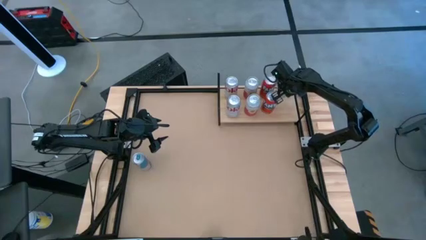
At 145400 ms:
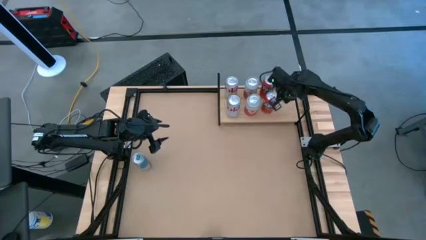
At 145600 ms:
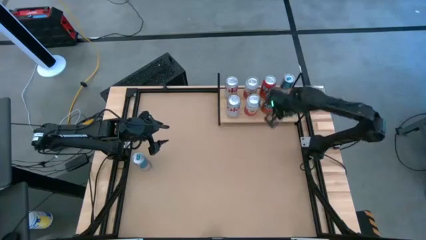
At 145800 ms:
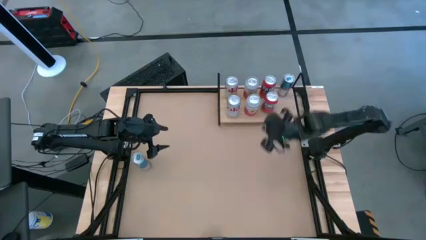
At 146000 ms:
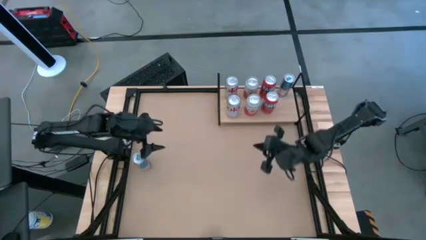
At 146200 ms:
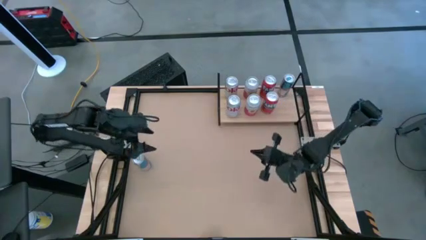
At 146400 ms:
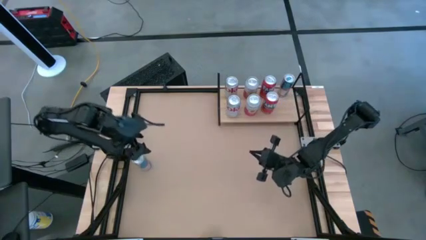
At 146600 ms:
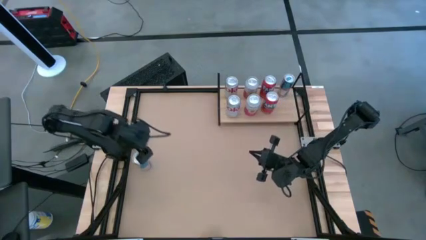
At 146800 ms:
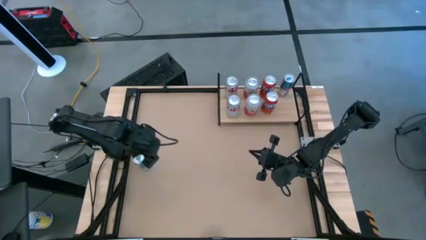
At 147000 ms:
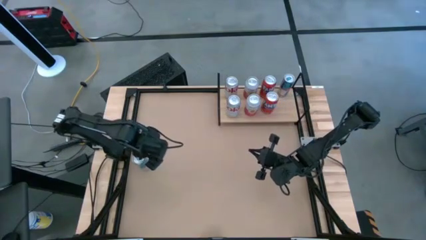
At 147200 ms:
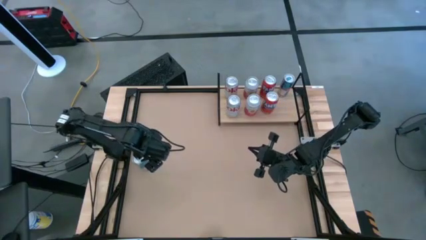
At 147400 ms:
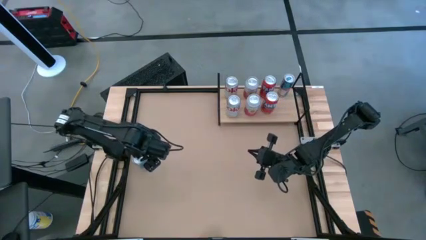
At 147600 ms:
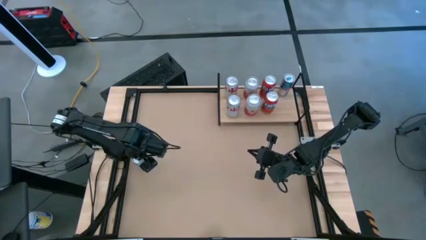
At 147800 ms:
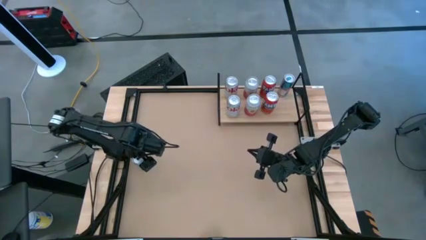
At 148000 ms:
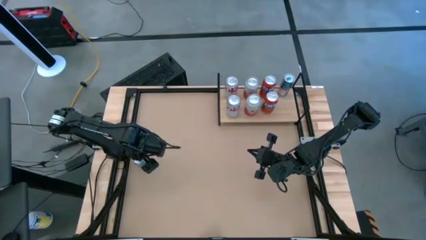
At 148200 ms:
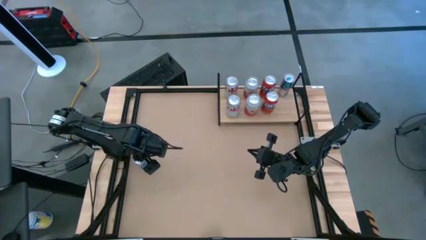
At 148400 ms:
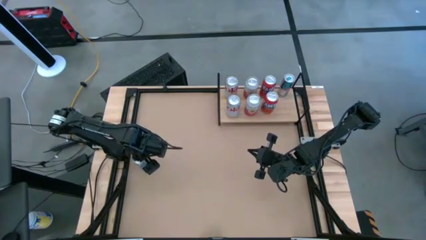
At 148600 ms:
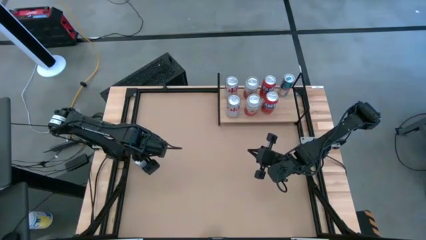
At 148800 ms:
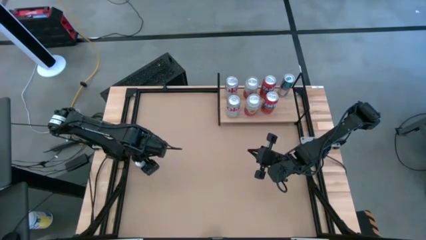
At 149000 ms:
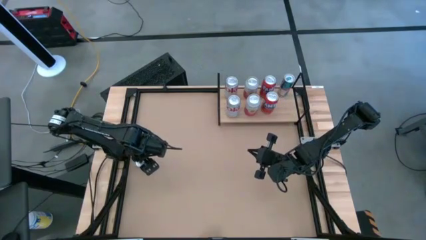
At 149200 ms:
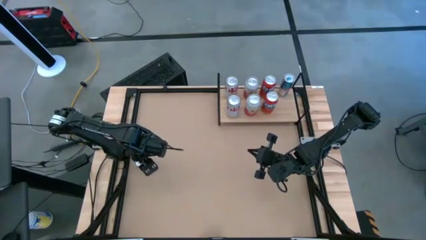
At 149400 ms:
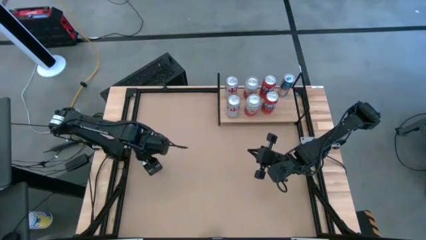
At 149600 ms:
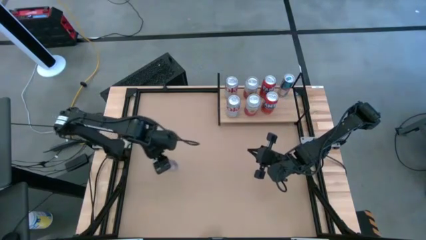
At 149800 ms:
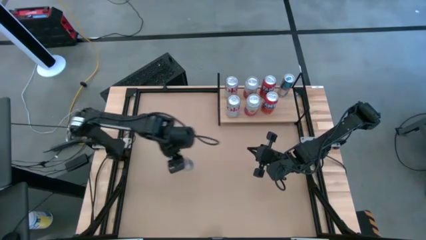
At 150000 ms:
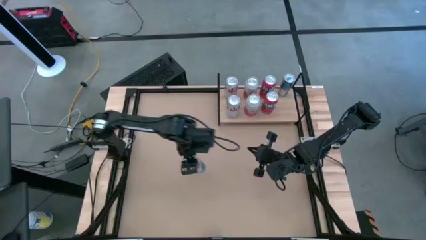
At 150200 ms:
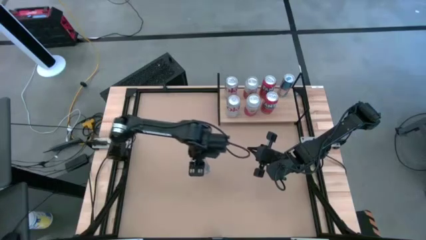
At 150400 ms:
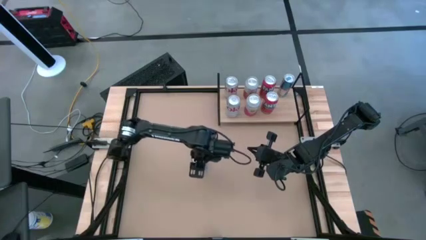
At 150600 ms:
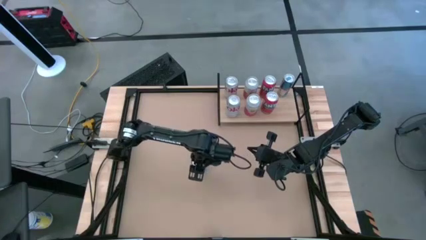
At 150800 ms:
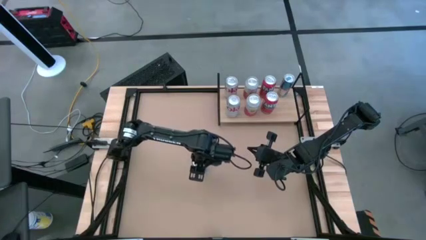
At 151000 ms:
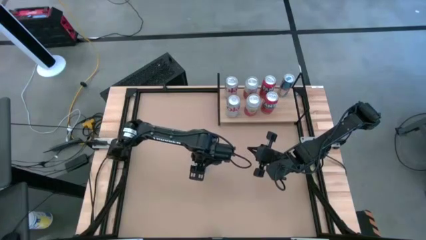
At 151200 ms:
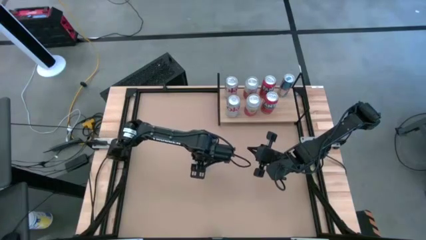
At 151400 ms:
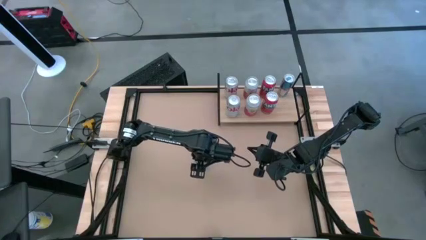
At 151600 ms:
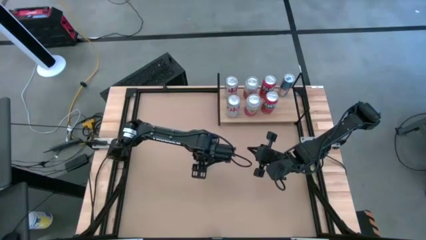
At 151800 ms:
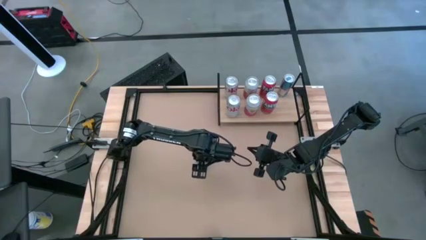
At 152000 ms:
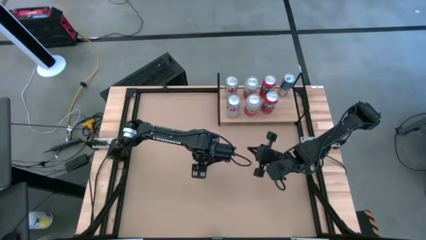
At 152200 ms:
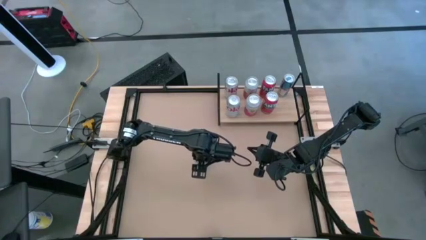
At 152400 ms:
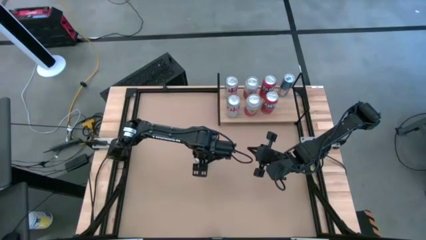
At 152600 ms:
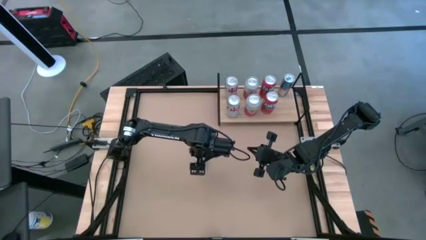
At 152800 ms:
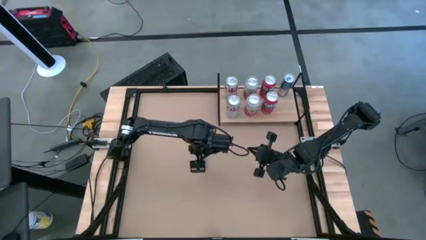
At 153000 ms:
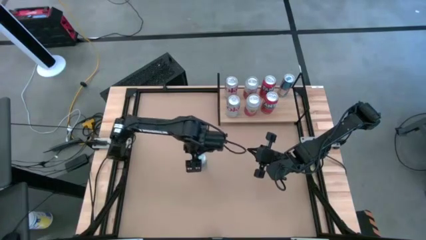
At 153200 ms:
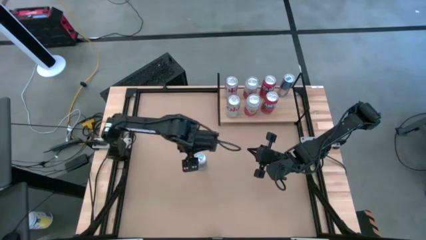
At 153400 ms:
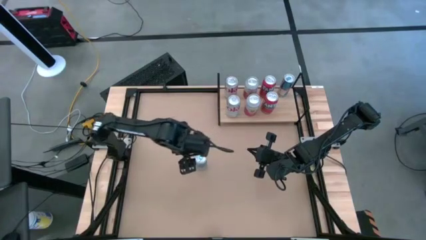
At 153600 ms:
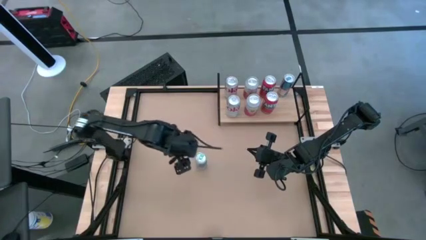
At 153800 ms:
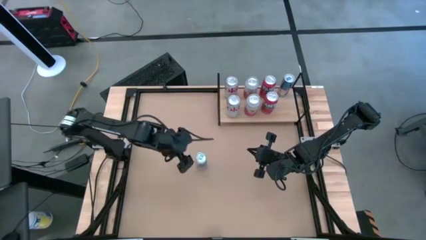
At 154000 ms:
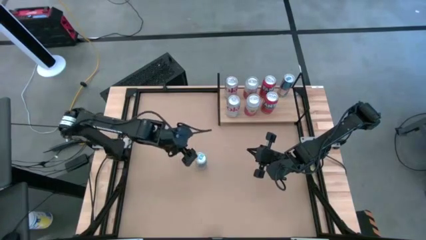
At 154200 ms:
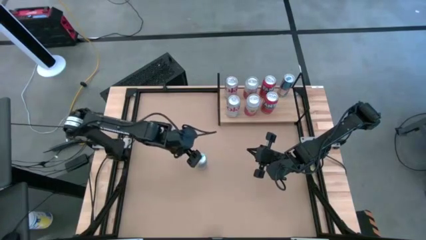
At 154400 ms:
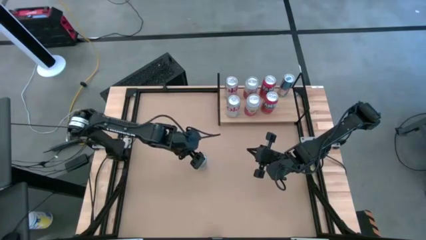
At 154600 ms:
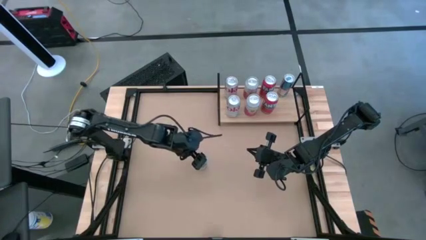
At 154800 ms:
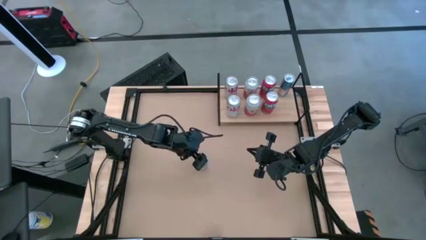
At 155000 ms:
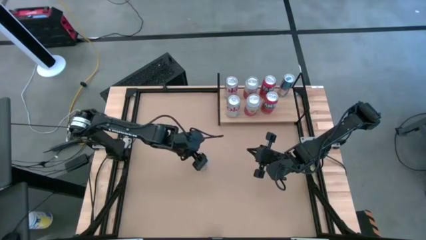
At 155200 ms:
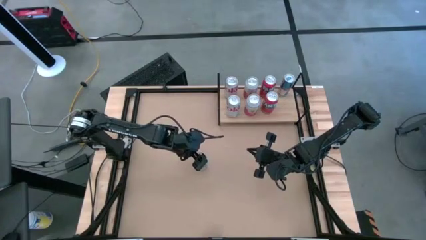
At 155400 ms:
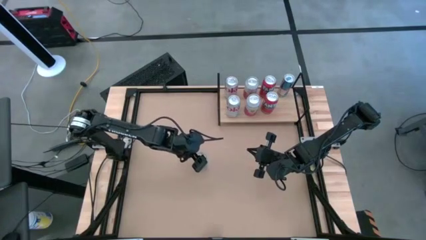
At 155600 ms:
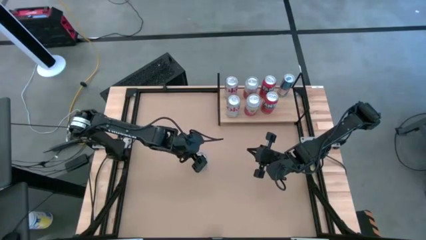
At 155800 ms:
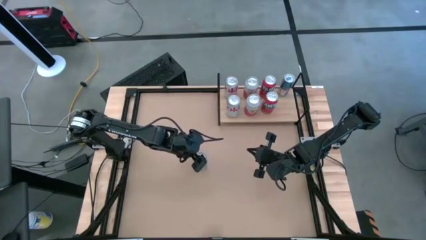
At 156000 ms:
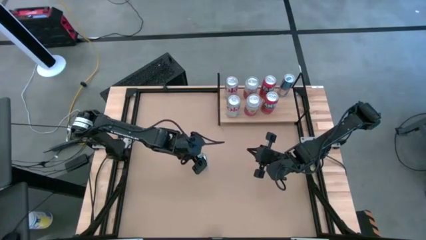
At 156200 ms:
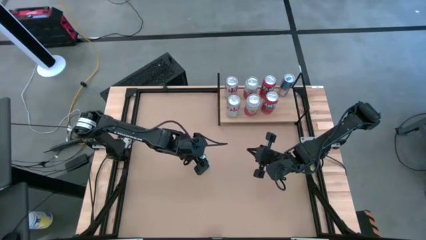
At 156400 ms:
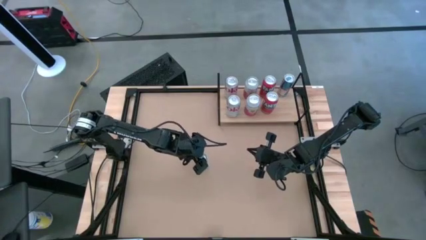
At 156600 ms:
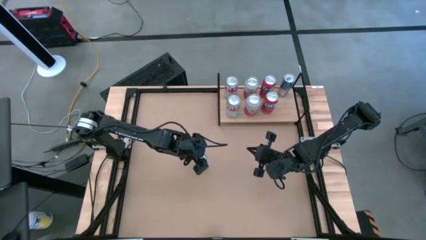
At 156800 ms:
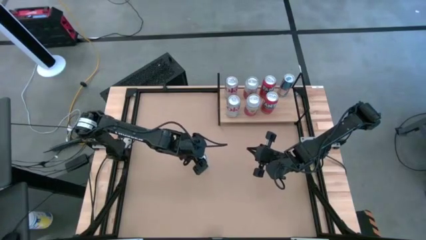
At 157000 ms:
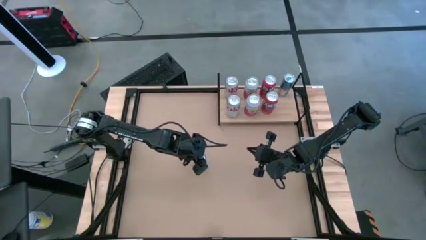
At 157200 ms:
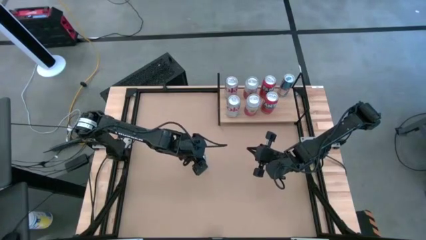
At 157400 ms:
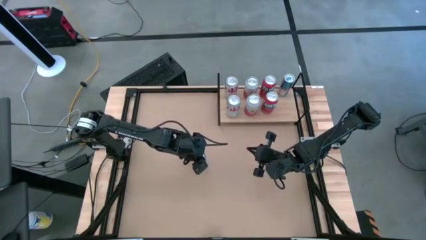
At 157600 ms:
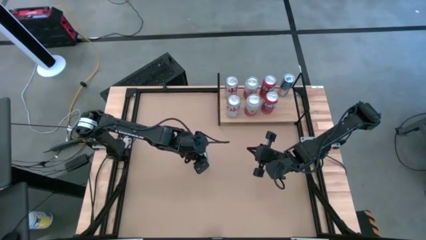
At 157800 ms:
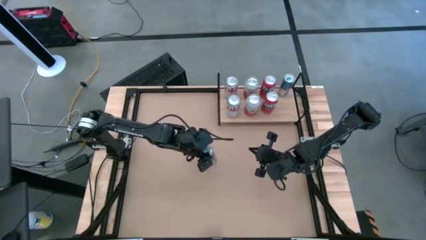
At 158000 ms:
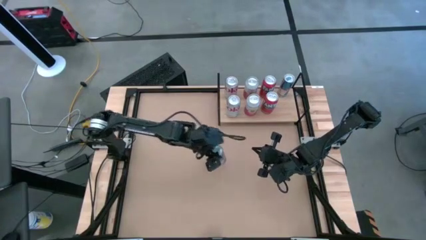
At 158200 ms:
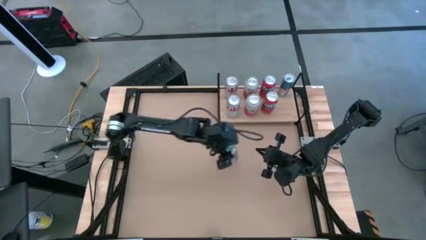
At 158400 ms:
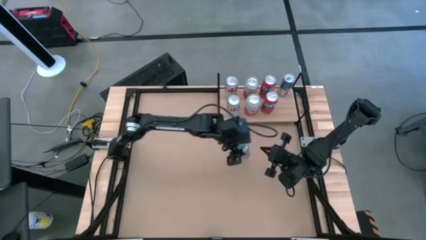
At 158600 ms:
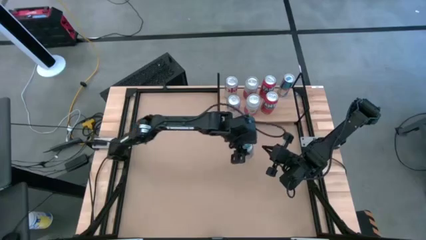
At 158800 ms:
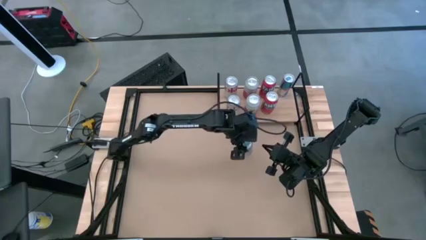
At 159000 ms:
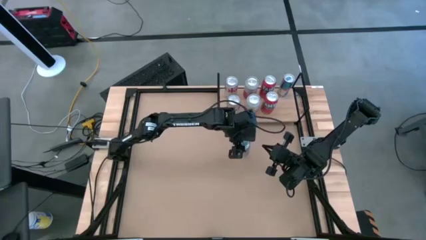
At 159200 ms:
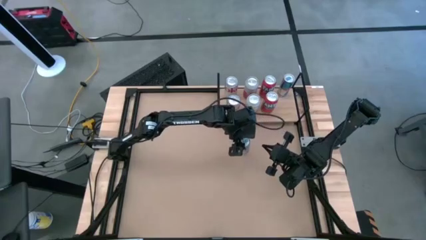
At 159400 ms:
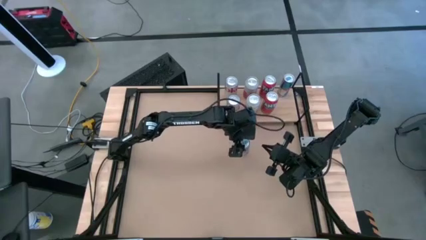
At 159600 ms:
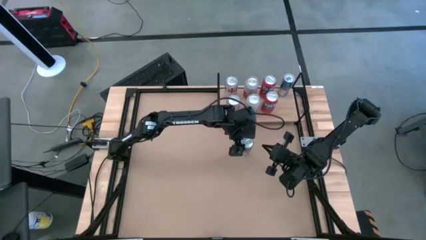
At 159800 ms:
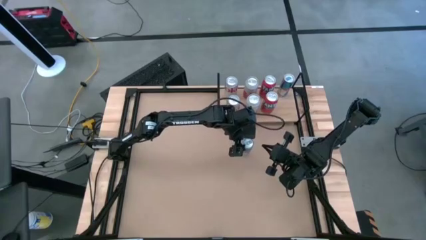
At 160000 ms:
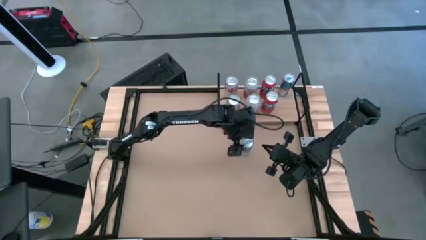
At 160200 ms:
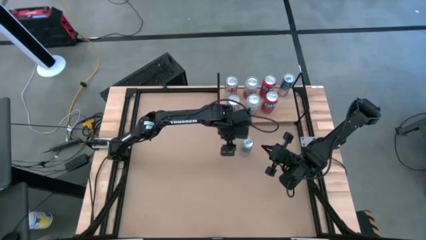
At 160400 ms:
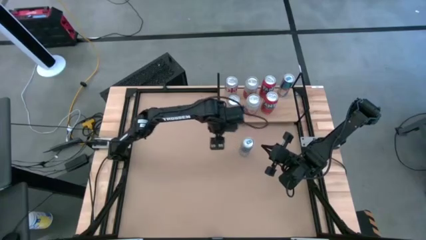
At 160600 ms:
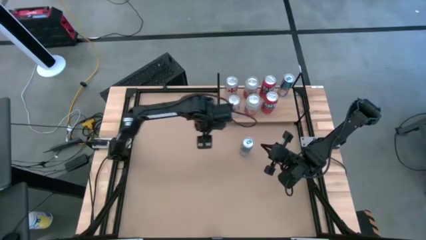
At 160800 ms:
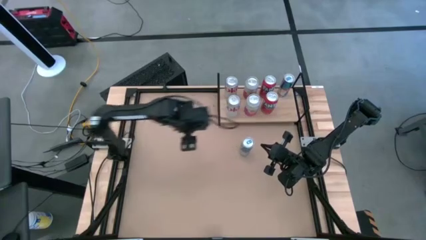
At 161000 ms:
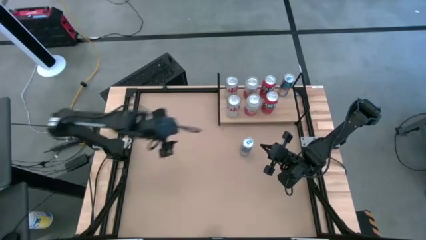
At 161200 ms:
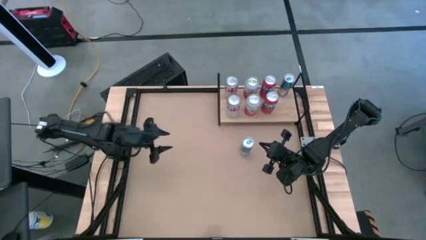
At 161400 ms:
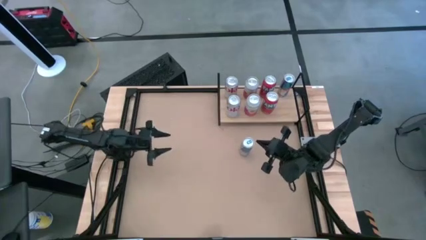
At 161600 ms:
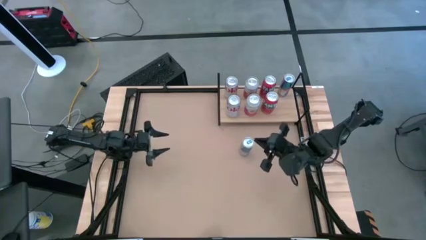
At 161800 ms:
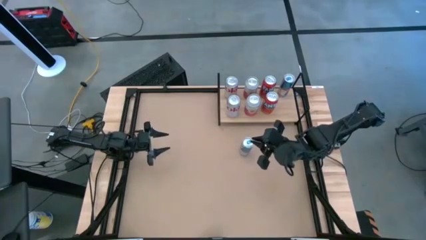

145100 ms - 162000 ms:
Task: Place canned beverage on shelf
Put the blue soda can on the shelf
